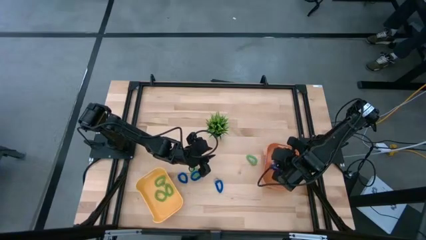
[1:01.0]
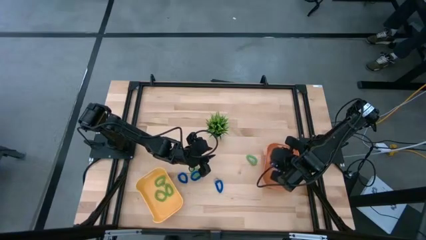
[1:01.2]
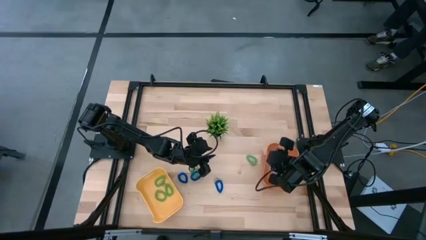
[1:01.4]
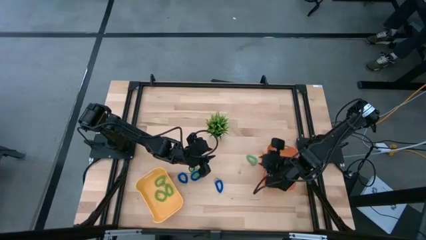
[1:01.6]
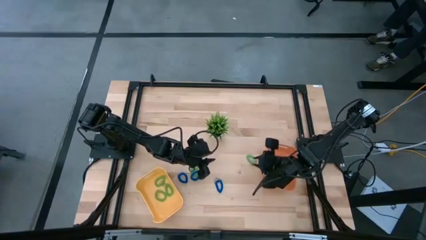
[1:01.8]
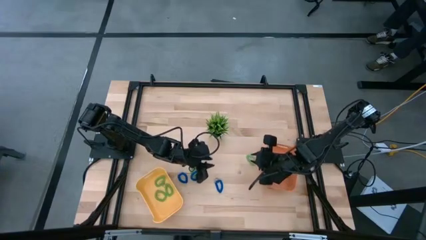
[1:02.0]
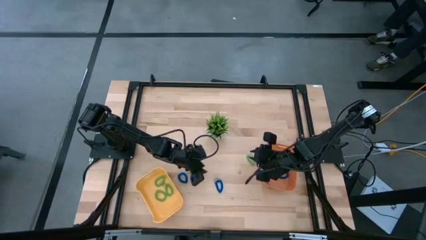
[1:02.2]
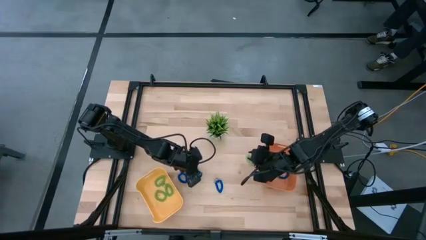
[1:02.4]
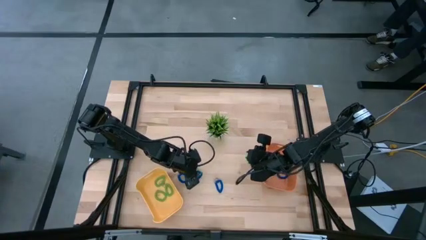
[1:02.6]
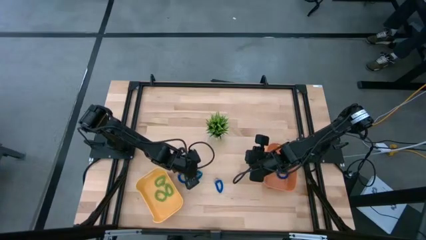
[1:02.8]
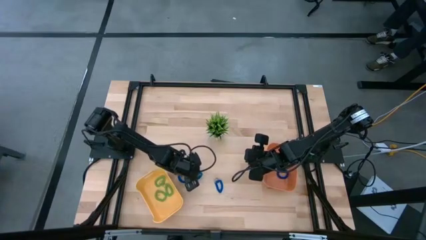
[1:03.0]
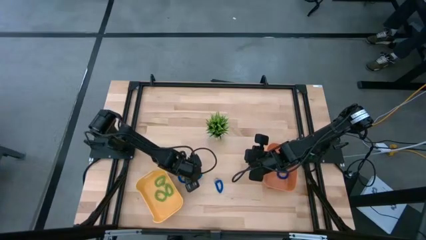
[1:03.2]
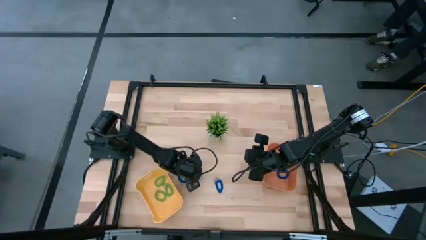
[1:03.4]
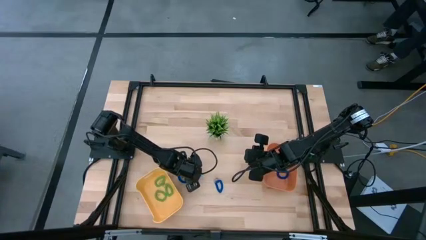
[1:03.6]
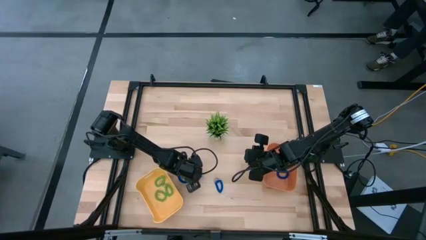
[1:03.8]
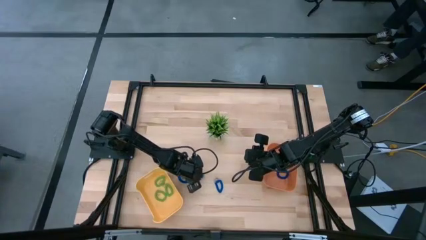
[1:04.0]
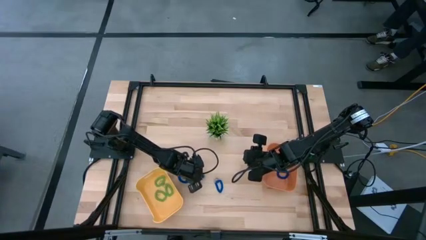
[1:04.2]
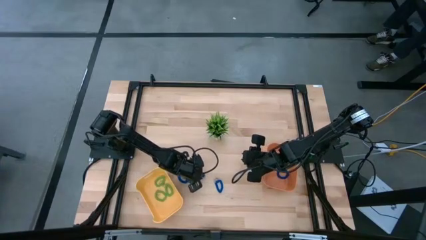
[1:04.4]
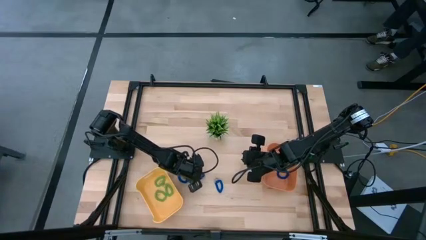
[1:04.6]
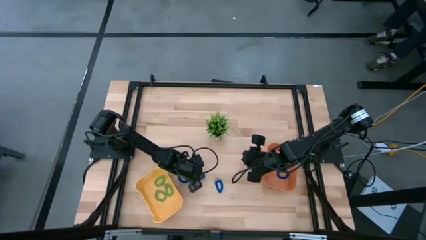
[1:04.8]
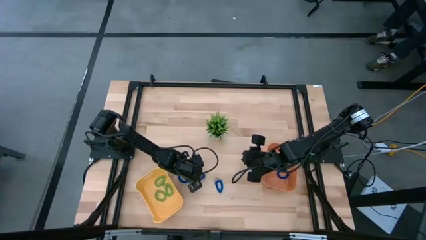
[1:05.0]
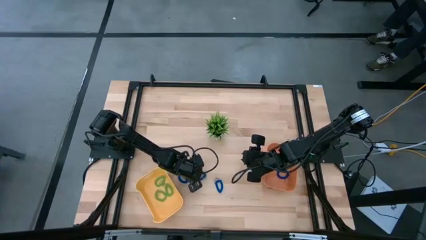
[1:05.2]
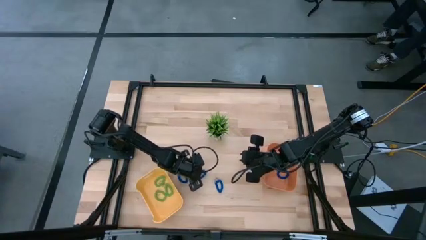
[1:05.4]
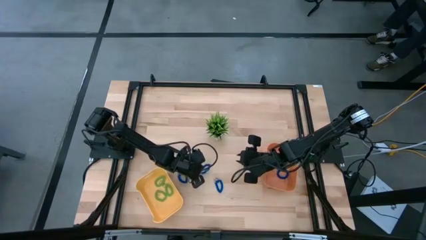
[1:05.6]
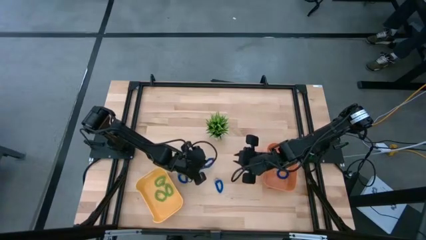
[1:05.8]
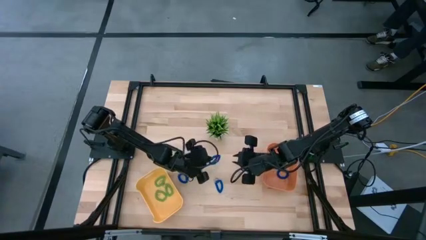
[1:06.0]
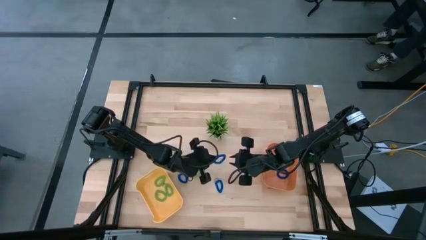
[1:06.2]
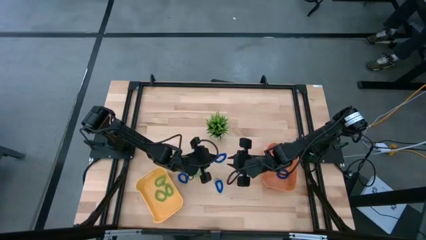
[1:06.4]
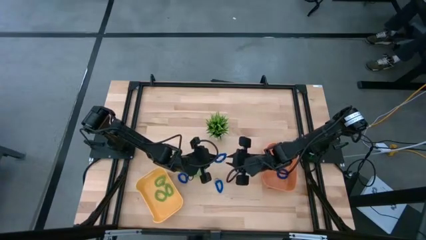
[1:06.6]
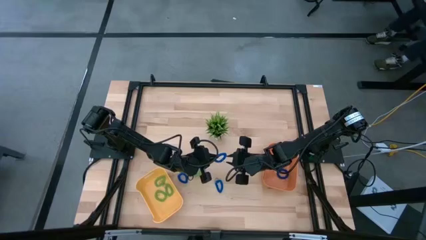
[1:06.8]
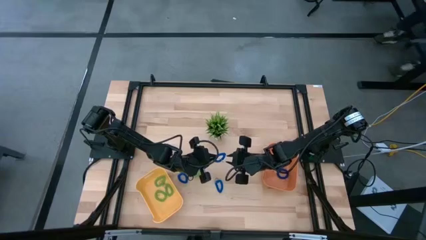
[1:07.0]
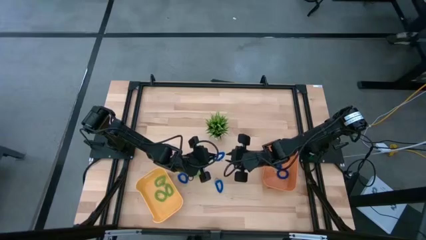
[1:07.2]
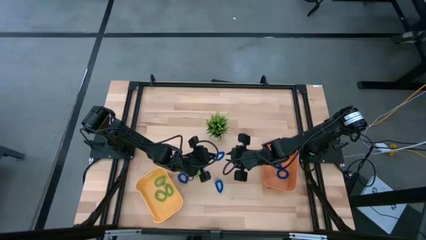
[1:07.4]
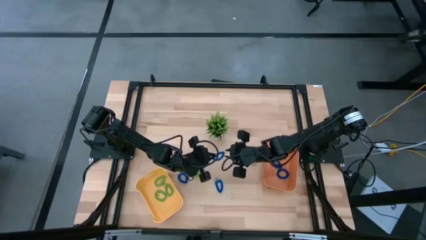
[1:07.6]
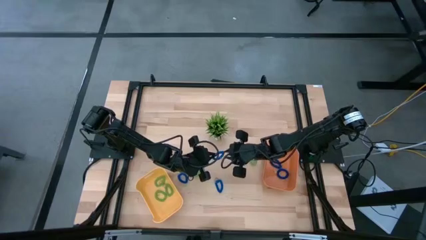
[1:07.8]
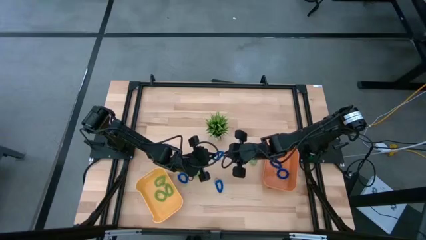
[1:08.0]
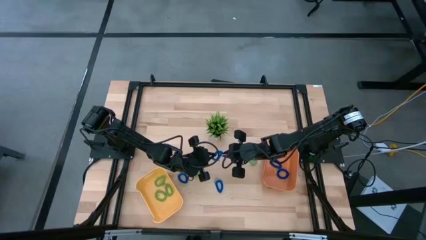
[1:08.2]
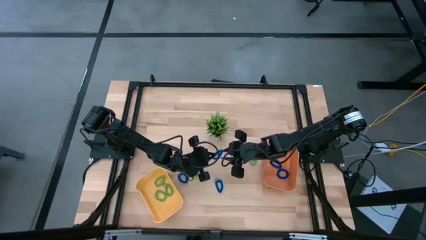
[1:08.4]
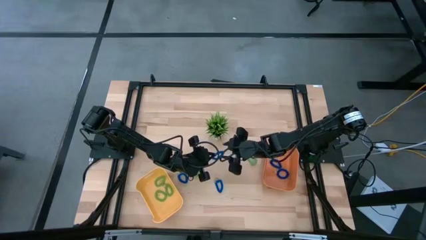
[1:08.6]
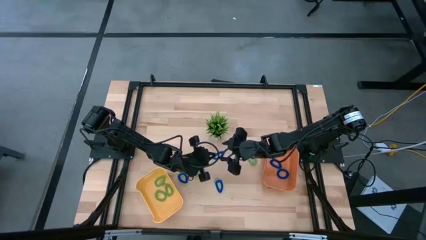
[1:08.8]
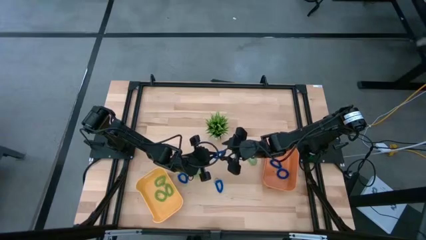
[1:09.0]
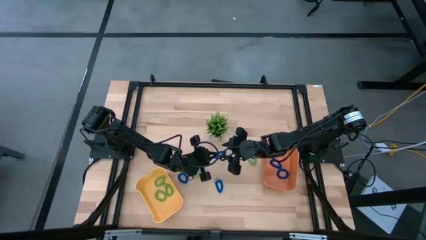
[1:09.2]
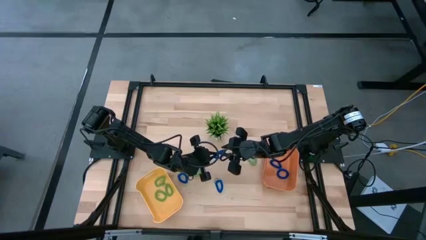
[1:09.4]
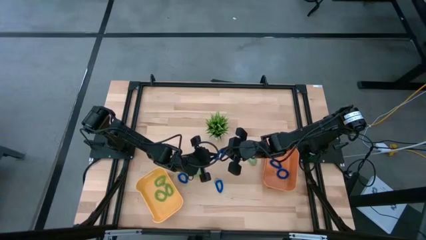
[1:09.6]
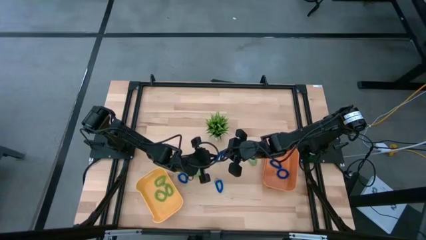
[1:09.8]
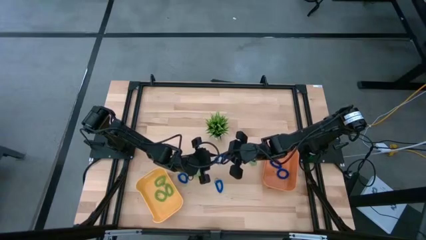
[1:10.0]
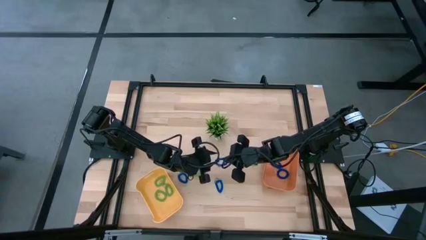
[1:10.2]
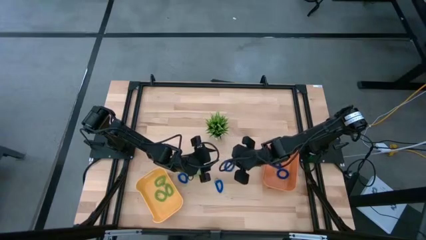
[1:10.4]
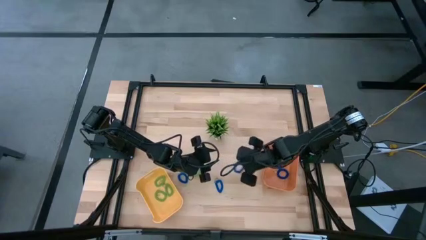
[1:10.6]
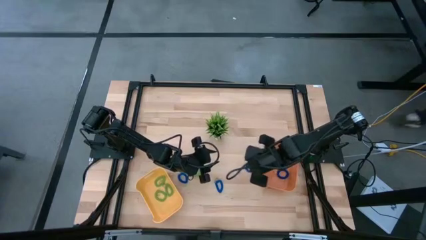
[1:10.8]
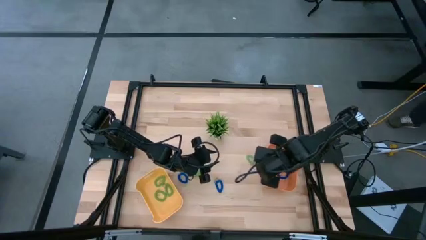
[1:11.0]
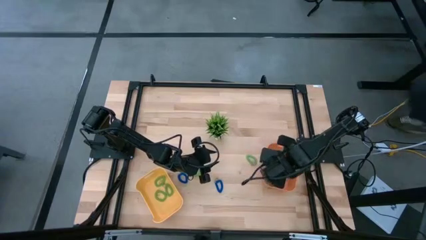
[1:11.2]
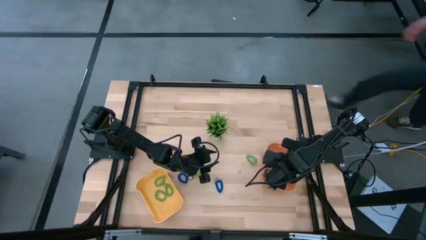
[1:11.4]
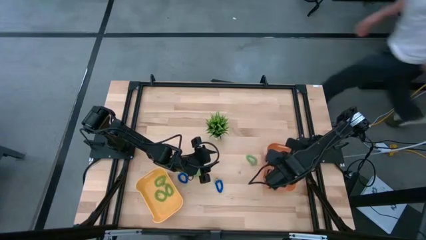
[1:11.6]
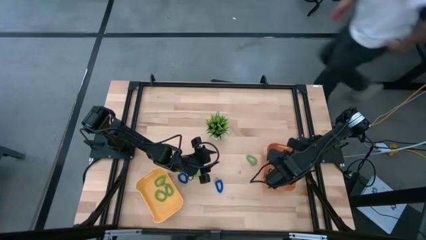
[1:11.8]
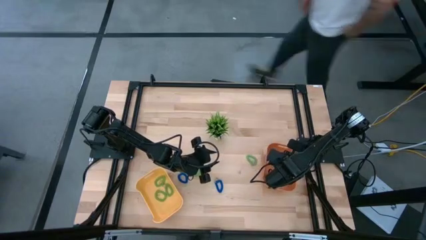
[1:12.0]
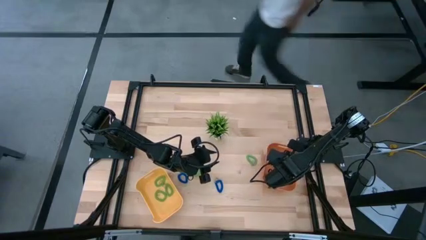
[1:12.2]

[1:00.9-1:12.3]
Task: Sort spring keychains
Put the blue spring keychain into the orange bin

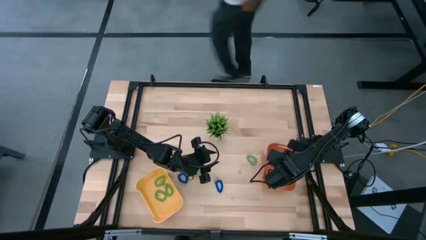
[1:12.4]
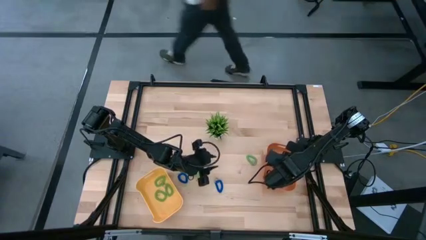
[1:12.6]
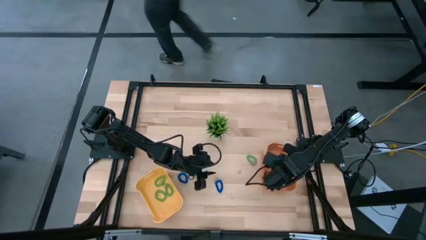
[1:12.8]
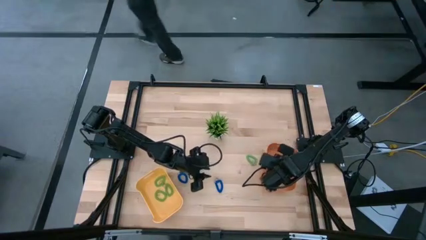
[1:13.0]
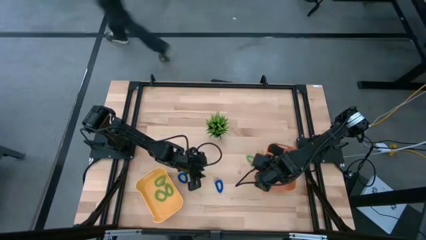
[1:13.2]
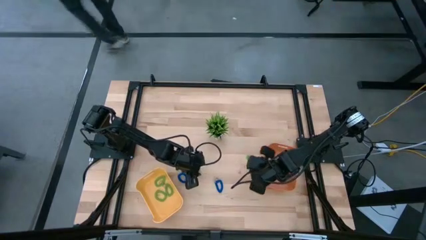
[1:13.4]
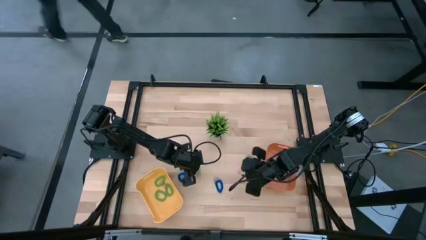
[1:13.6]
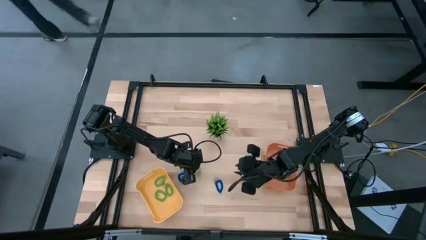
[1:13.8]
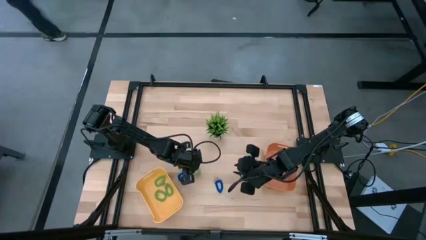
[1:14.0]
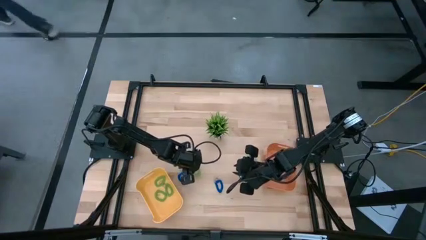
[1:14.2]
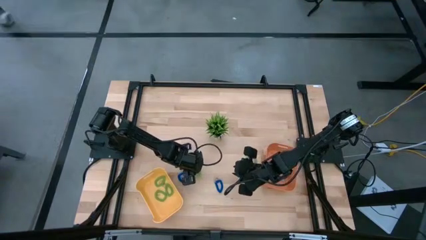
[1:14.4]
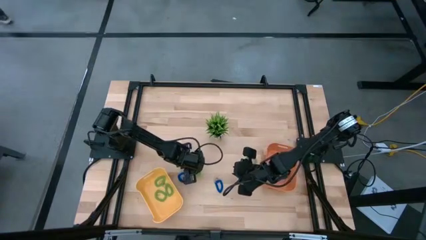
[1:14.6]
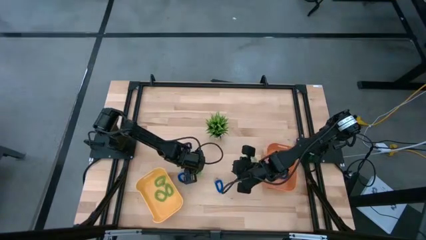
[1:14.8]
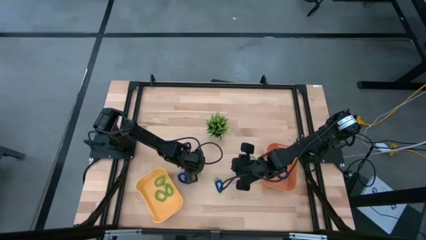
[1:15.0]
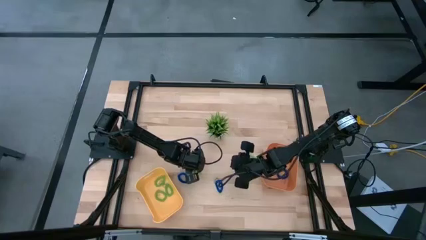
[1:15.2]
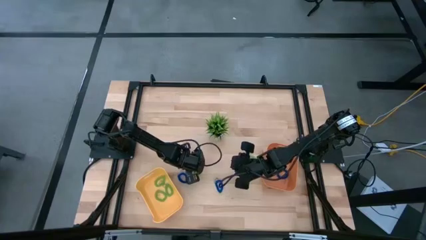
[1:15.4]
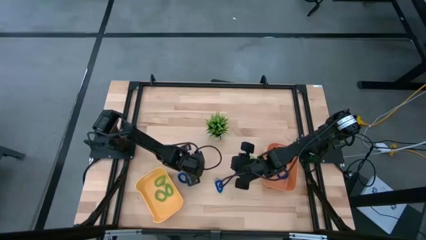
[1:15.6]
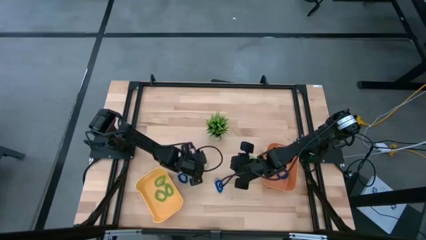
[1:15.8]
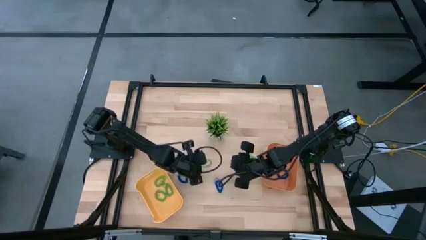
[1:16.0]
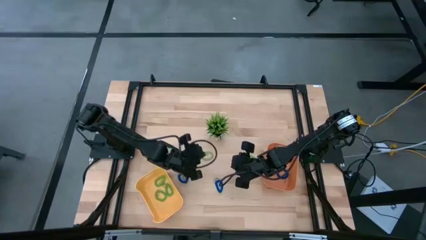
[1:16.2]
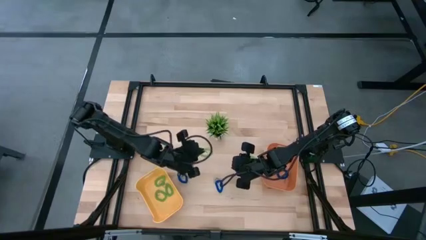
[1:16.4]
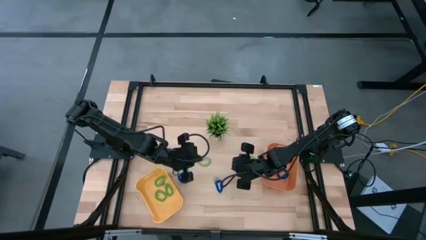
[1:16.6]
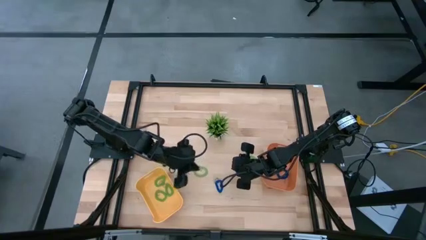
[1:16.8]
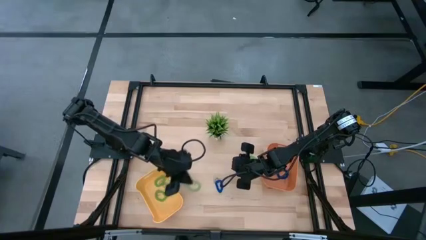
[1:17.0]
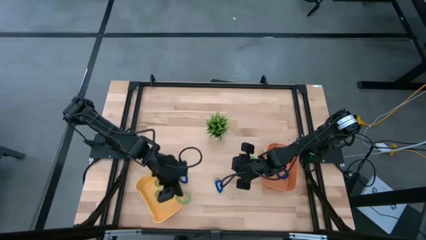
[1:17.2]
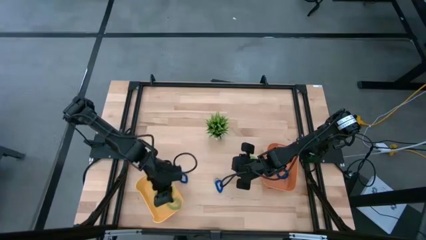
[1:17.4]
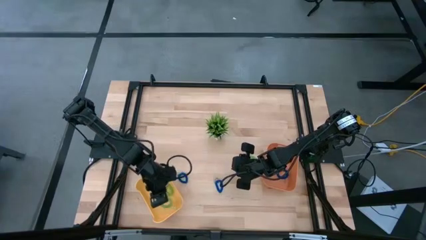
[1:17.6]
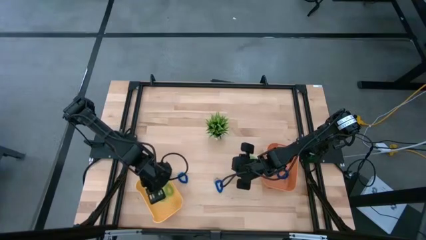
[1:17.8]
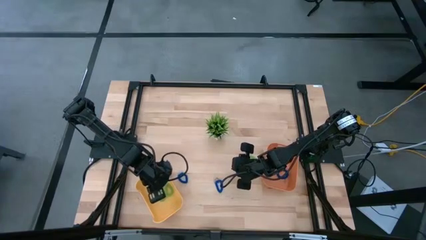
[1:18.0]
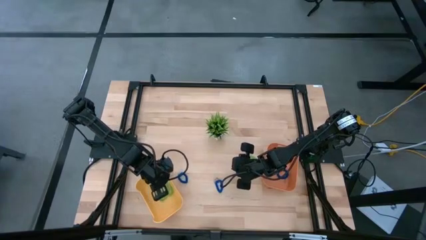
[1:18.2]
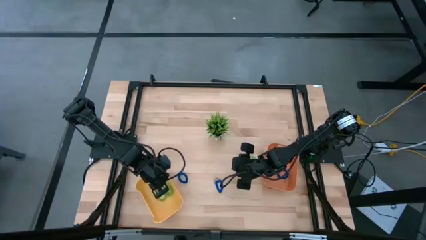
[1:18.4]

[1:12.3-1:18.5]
Put the green spring keychain into the yellow bin
